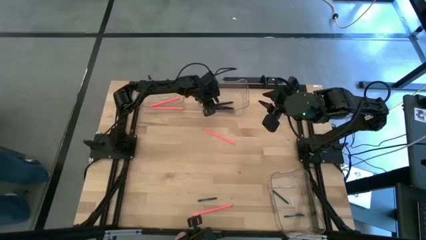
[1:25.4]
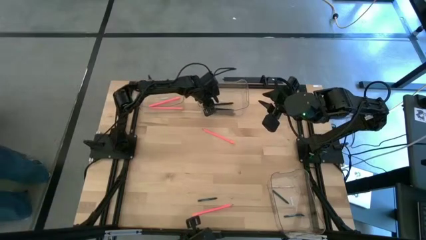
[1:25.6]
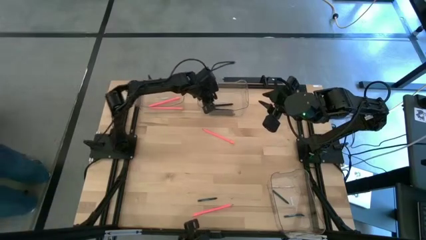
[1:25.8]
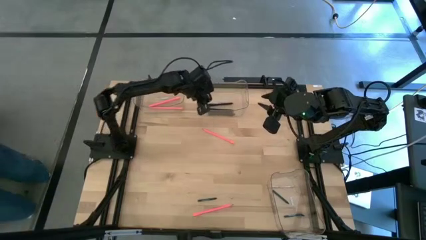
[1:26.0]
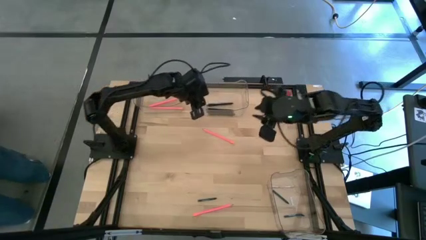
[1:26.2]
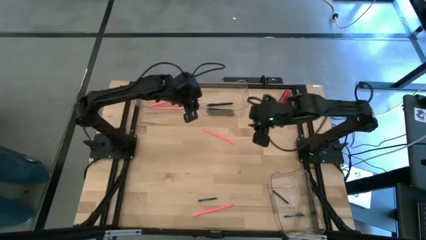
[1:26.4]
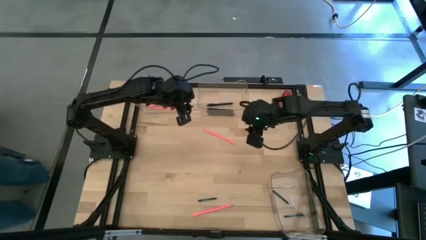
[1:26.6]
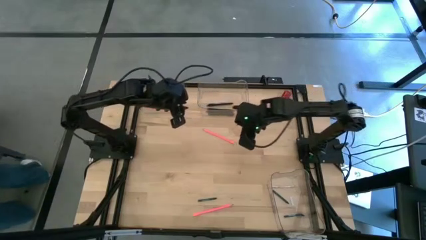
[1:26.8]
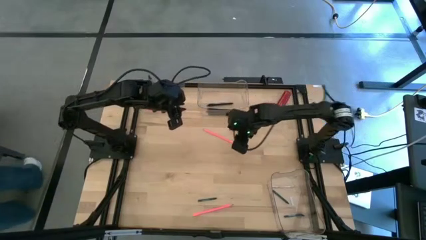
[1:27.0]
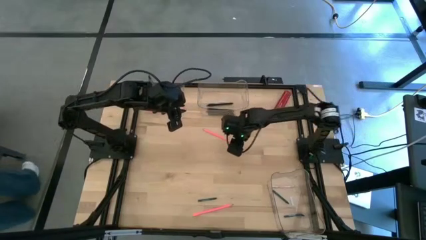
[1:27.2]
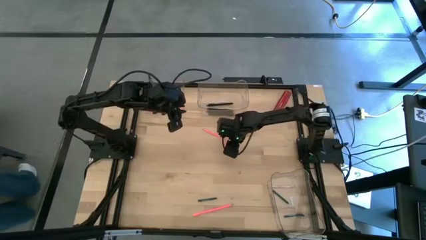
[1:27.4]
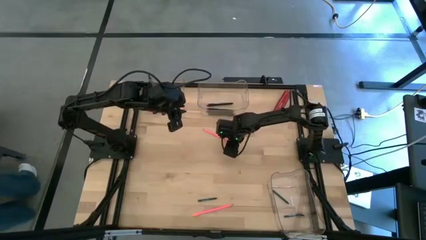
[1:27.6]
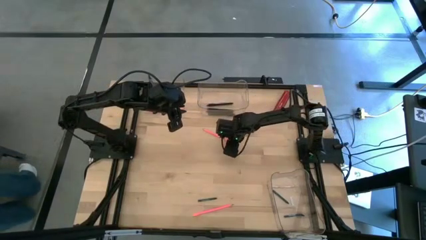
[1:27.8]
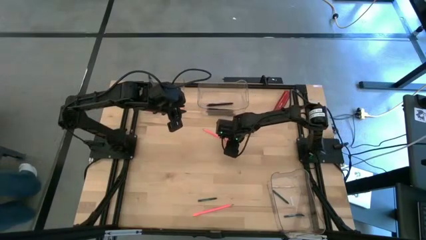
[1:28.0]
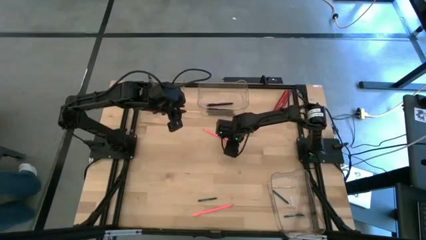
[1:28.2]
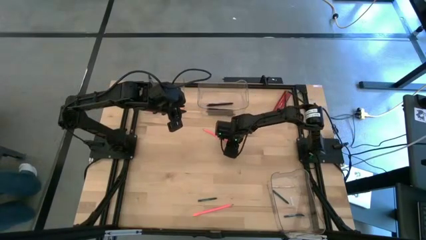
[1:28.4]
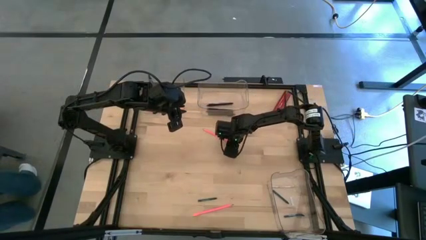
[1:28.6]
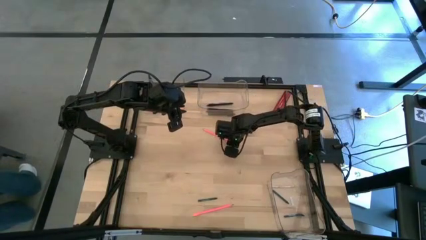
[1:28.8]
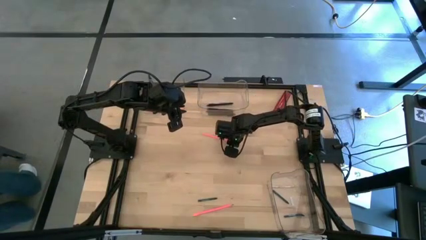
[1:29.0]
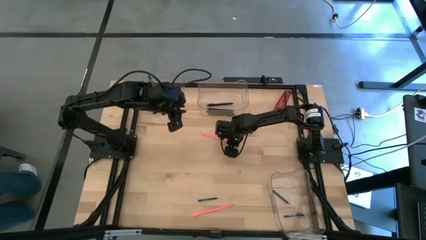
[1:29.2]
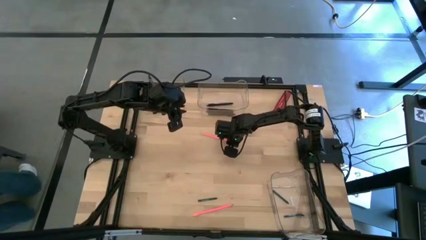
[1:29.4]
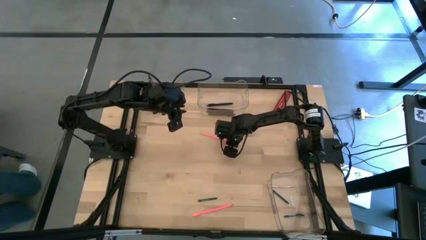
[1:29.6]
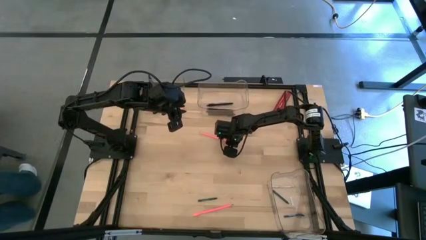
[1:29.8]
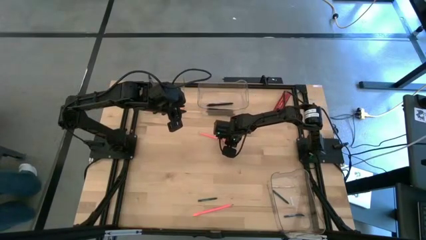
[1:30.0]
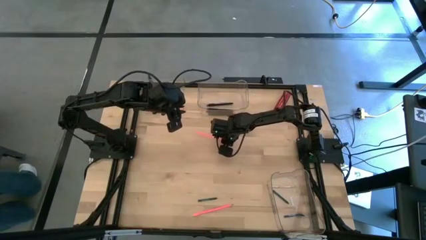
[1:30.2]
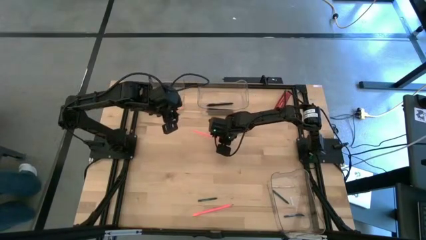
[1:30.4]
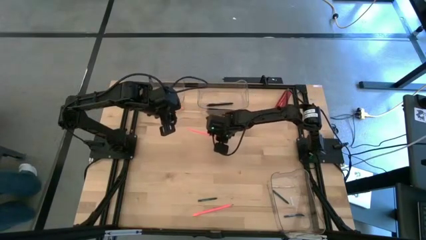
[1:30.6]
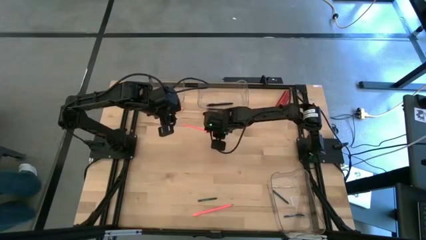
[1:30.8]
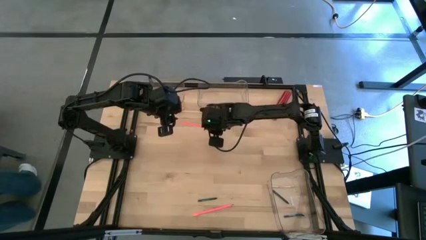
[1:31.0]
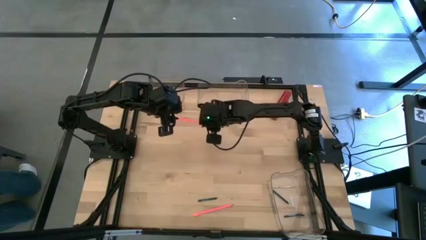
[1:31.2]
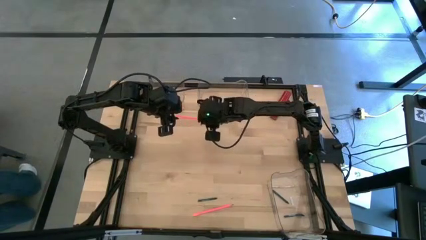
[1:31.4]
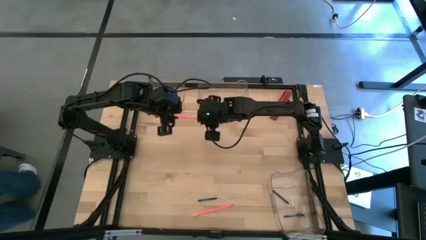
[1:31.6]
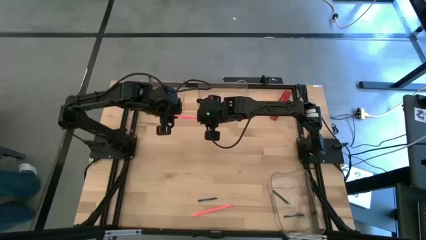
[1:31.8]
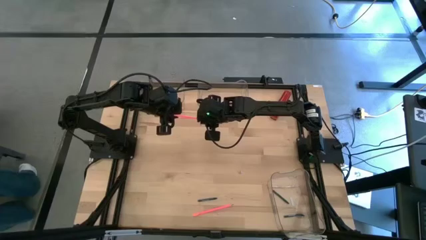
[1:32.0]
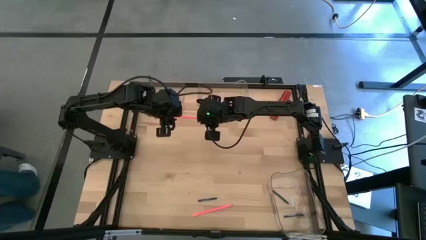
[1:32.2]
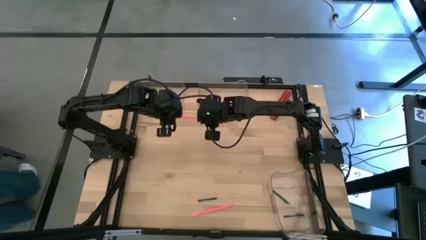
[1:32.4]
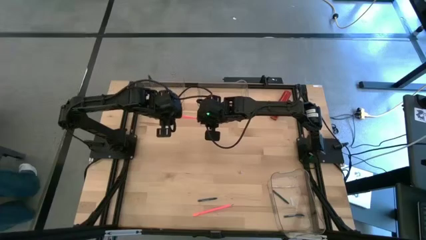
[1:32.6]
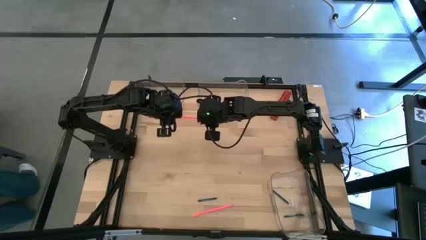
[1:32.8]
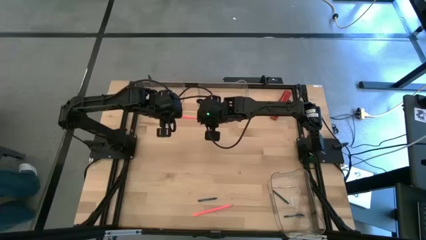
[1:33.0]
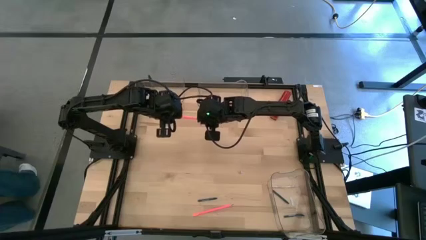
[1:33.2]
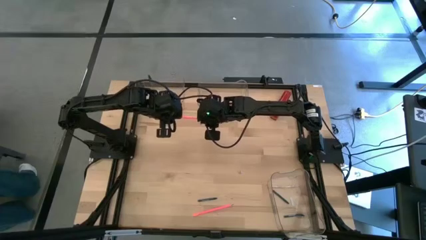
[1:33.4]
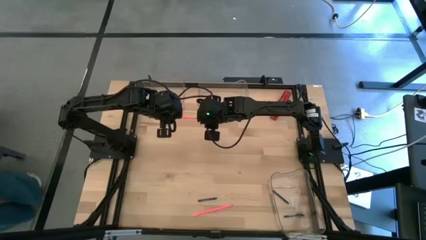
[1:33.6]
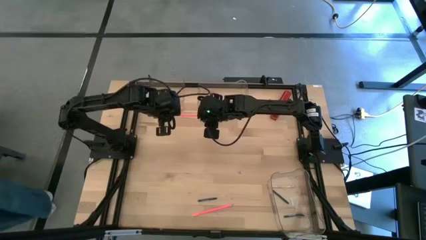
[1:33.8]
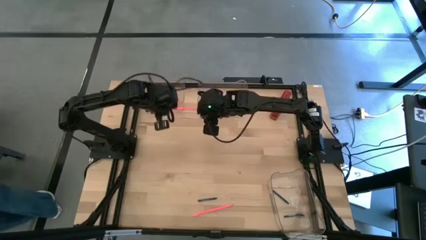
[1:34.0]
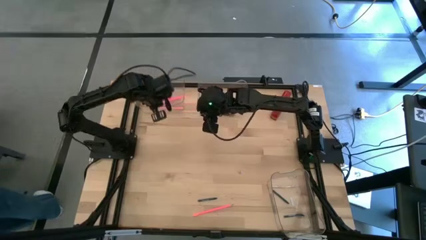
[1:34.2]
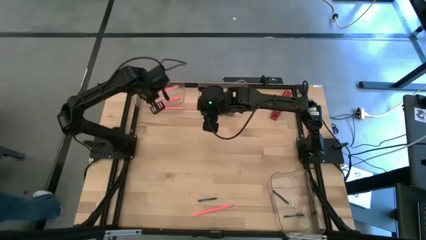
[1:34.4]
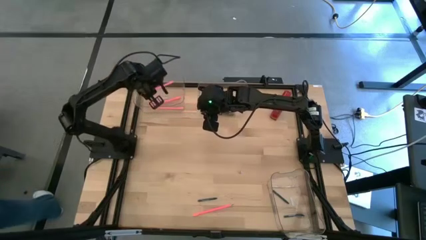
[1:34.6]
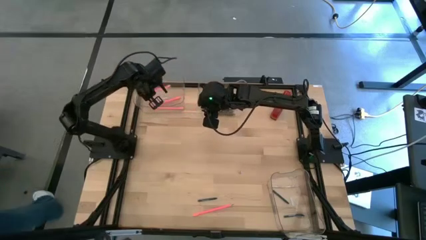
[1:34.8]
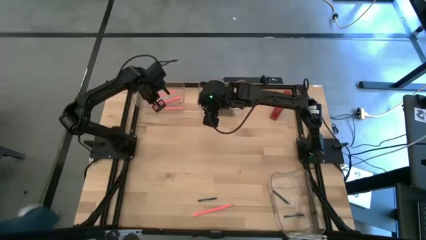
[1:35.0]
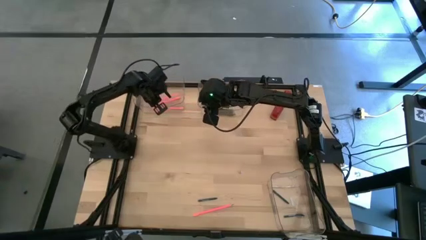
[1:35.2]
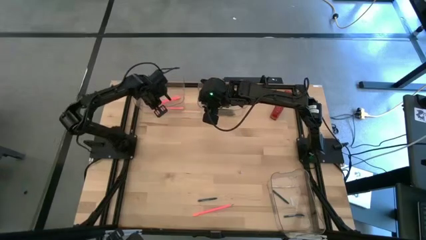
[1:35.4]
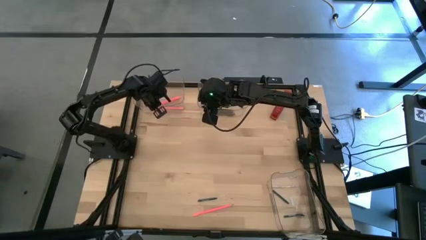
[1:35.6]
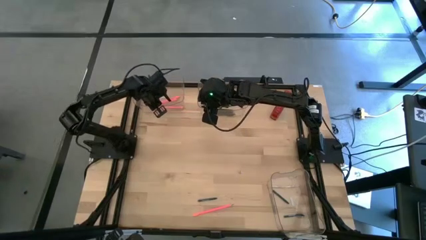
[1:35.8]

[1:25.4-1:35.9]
Task: Sort crayons/erasers/pens/pencils in bins
Put the pink pencil into the top left transparent bin

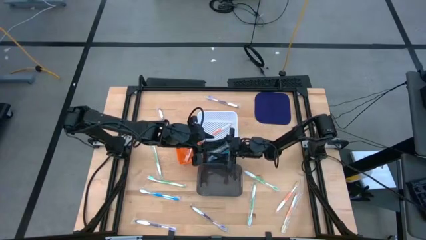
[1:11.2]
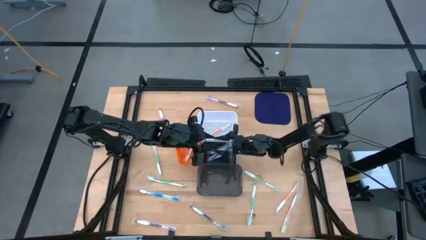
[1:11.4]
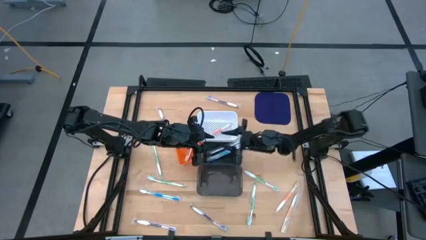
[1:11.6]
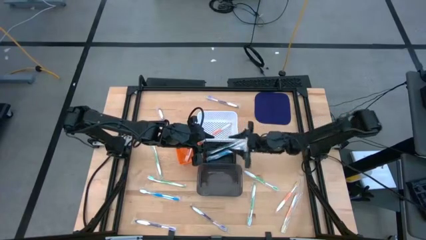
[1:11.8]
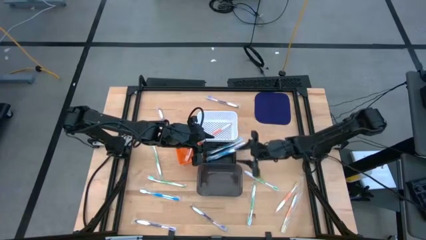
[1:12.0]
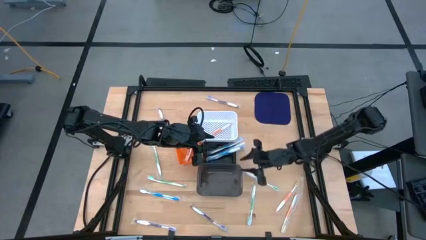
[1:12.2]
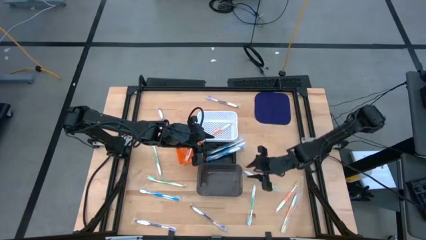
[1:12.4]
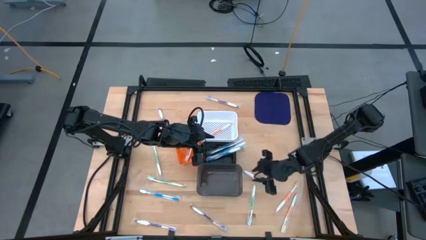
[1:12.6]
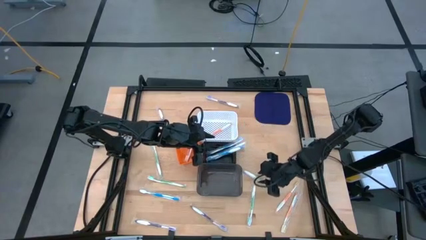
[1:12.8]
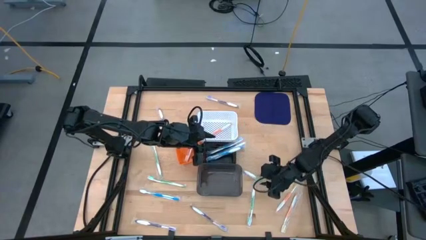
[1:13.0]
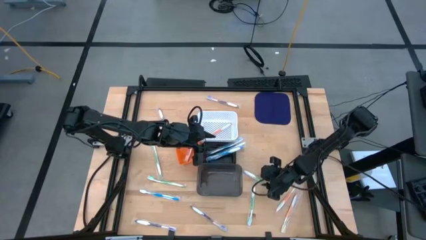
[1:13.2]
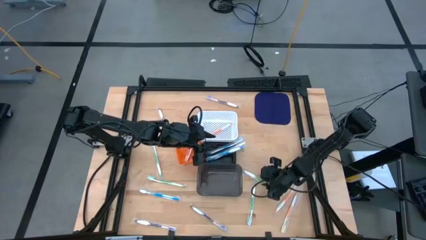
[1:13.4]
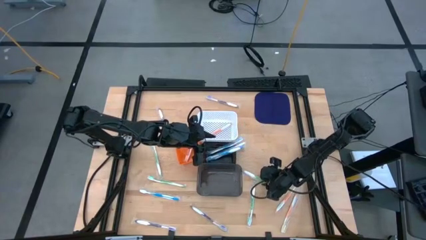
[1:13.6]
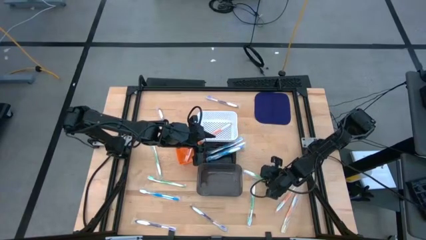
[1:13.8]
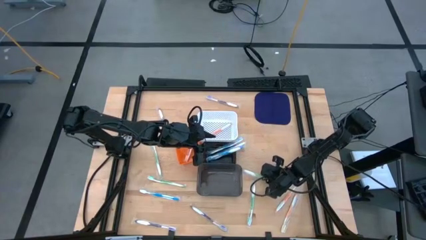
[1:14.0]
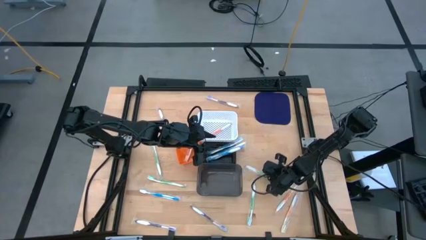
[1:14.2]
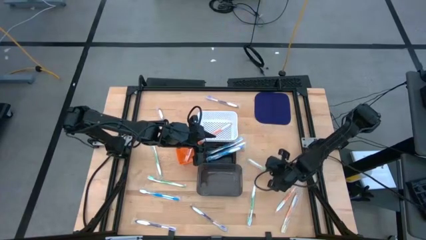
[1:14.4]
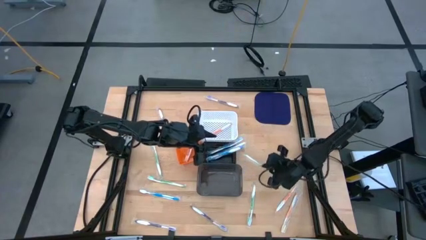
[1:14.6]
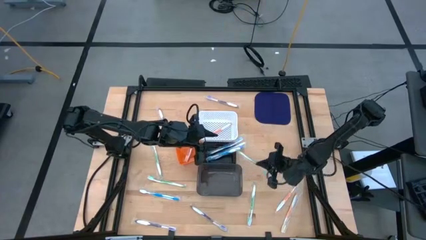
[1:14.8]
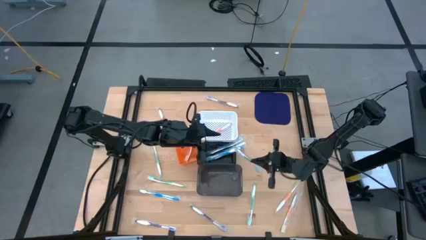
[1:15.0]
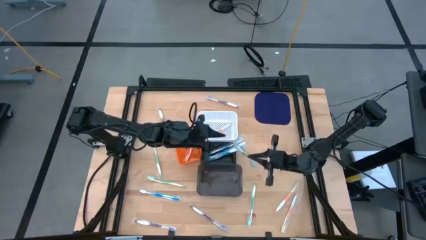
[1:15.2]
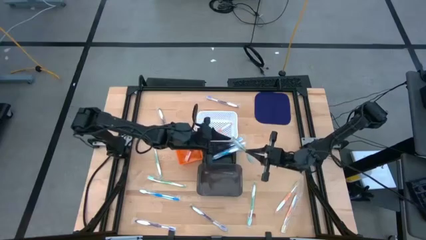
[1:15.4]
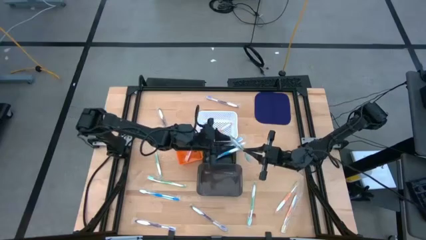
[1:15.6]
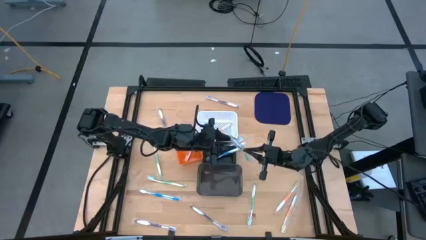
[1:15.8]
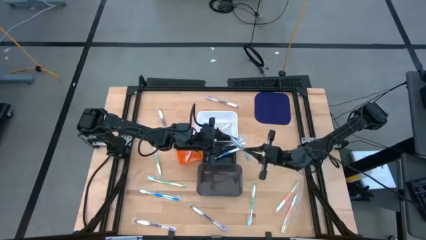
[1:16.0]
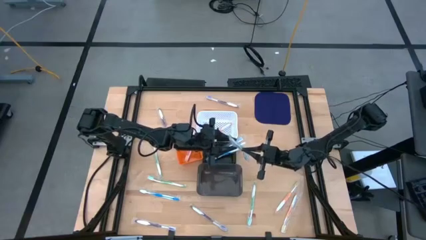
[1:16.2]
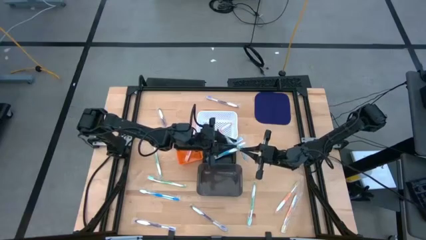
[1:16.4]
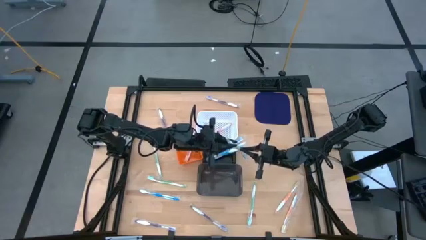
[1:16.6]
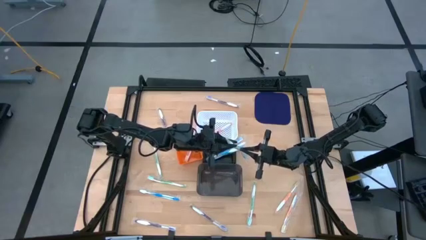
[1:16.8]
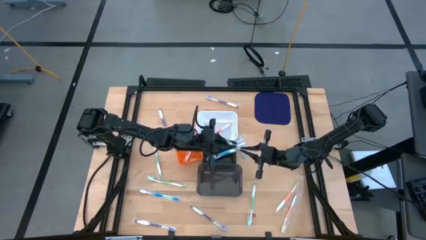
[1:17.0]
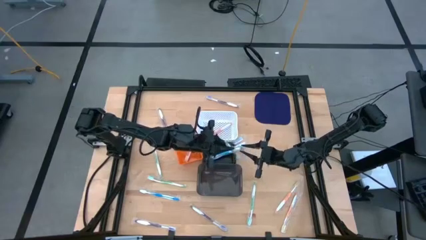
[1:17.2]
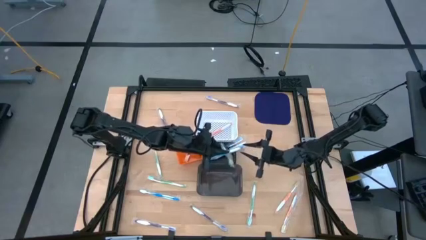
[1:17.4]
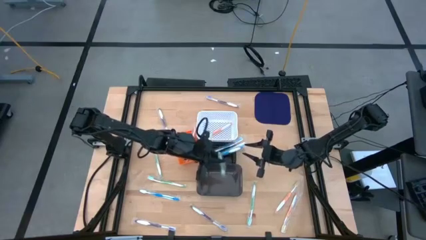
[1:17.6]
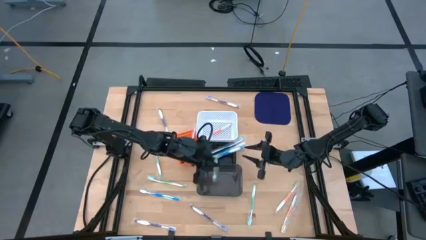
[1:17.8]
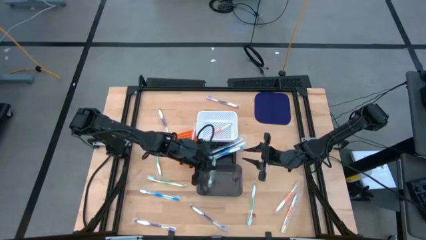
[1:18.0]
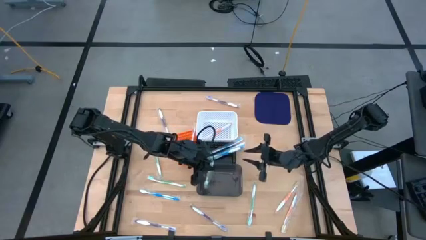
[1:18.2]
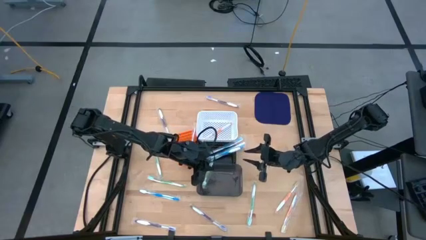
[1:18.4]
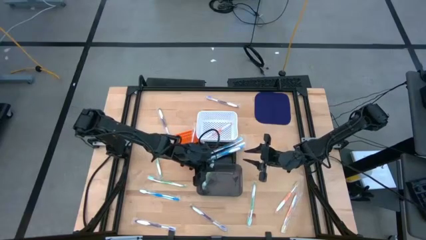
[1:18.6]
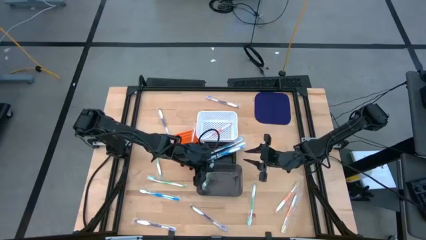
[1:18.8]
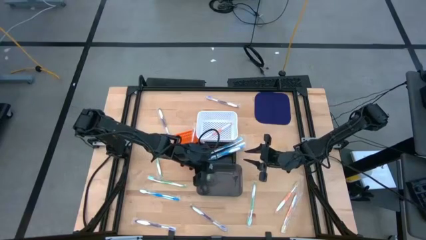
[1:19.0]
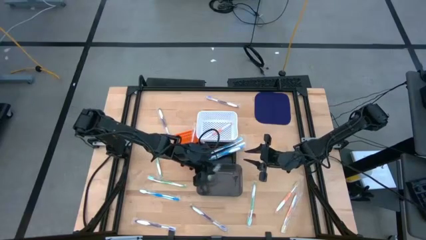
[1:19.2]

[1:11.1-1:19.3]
Task: Pick & Place Toothbrushes
Put the green toothbrush into the black bin
